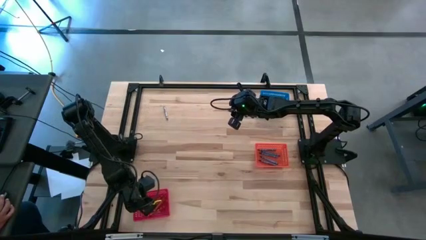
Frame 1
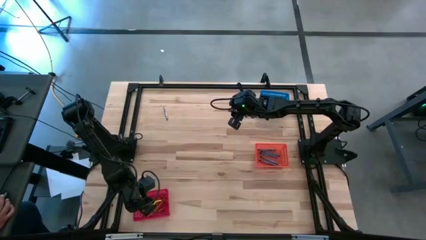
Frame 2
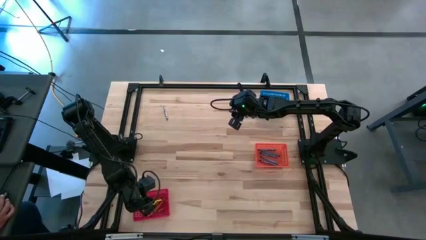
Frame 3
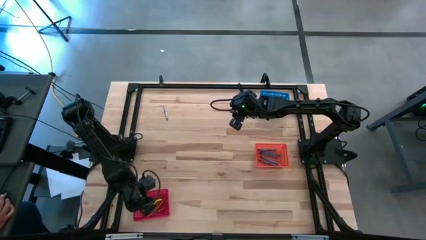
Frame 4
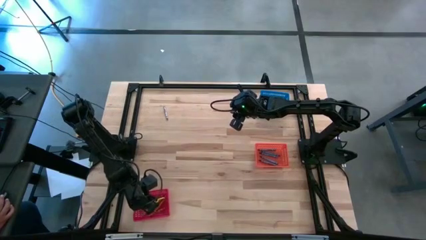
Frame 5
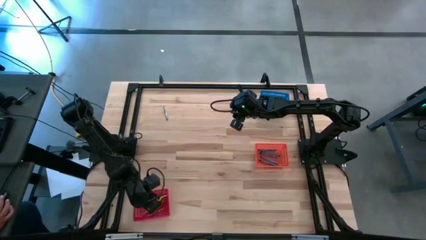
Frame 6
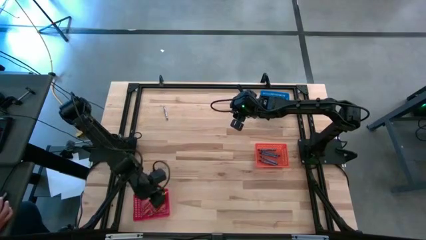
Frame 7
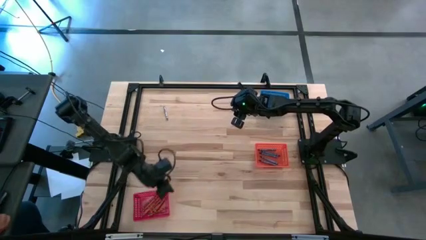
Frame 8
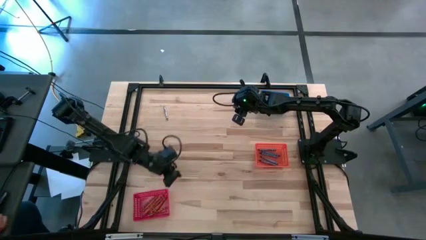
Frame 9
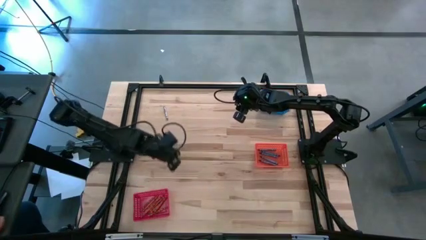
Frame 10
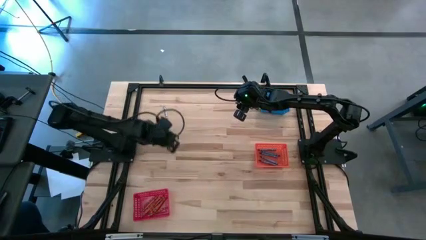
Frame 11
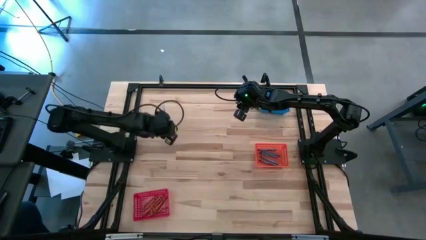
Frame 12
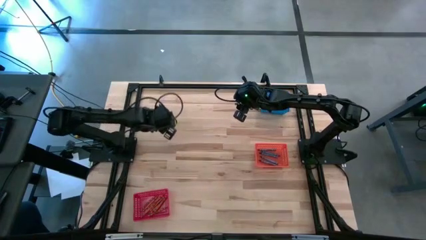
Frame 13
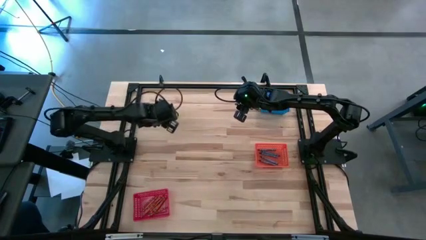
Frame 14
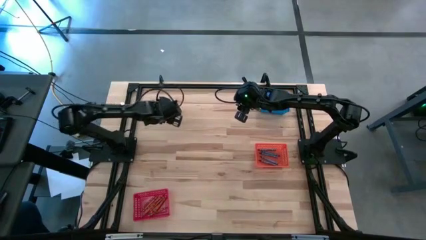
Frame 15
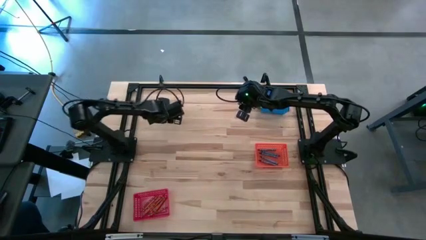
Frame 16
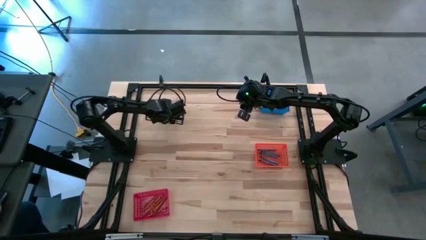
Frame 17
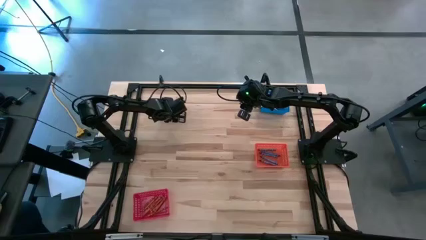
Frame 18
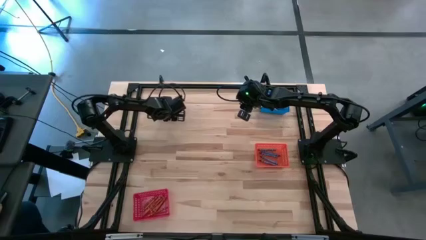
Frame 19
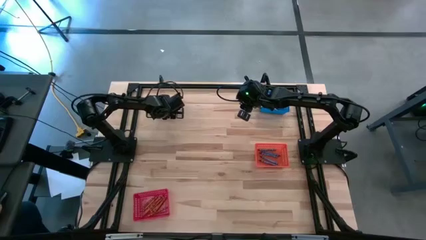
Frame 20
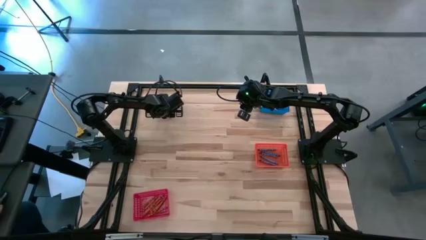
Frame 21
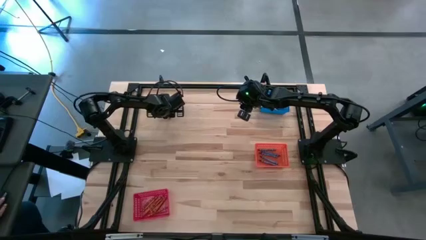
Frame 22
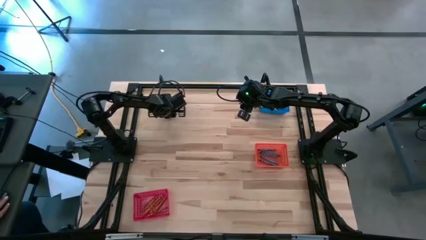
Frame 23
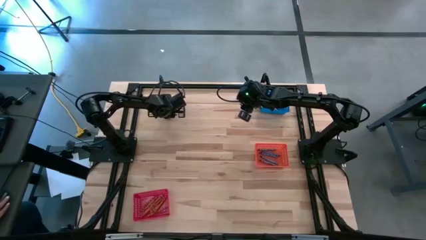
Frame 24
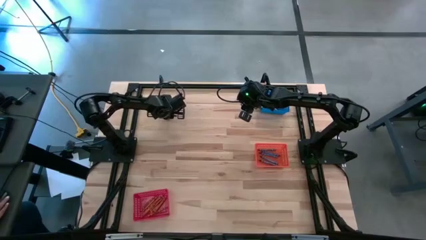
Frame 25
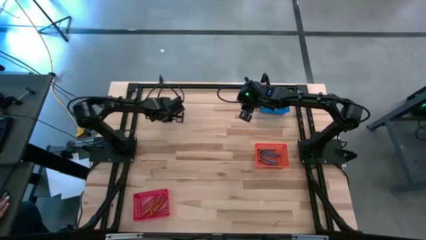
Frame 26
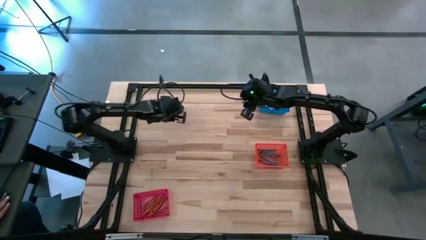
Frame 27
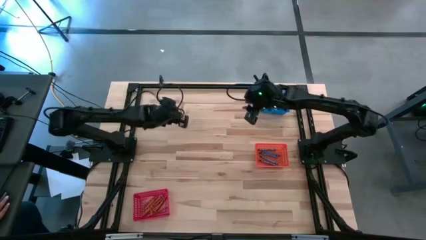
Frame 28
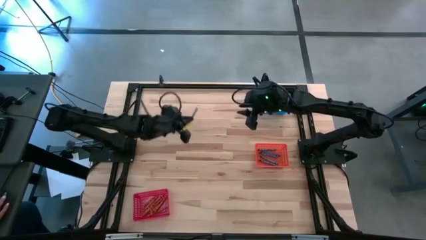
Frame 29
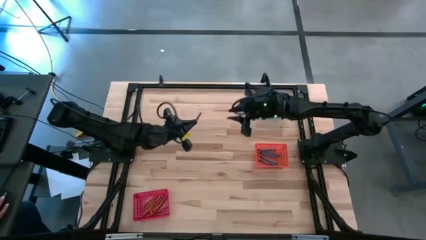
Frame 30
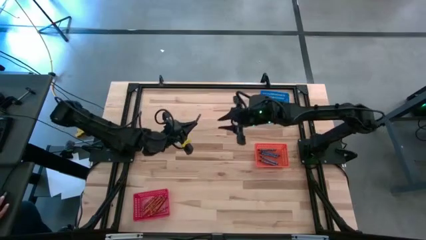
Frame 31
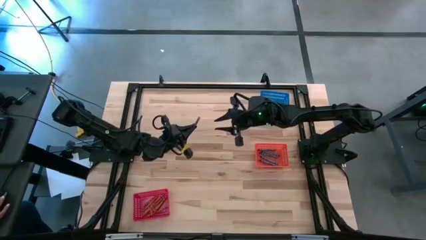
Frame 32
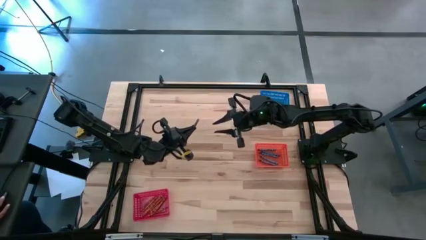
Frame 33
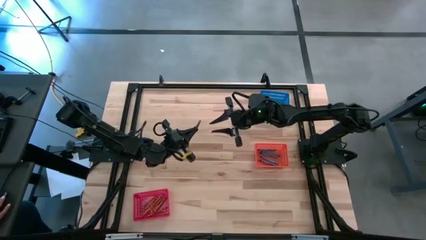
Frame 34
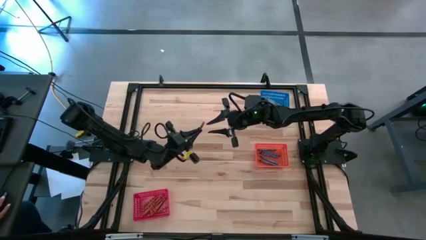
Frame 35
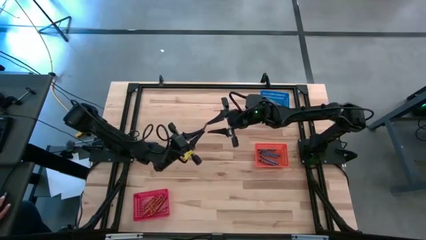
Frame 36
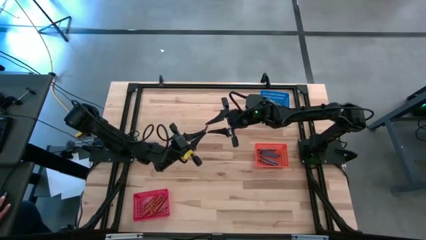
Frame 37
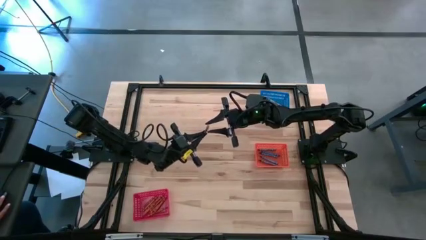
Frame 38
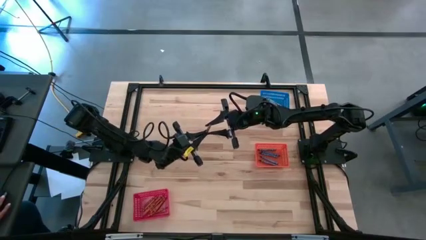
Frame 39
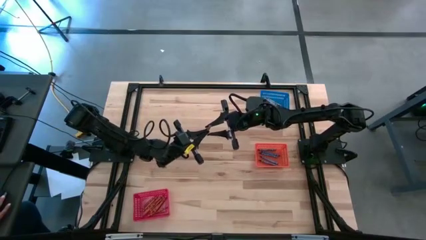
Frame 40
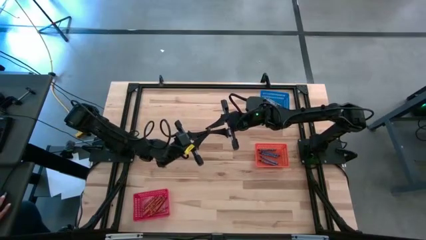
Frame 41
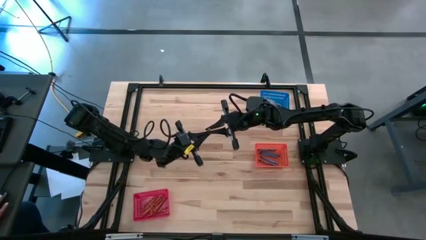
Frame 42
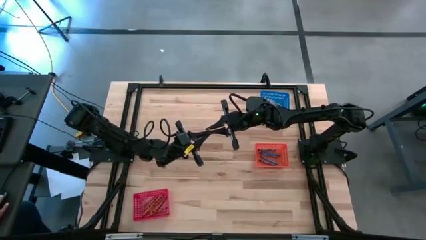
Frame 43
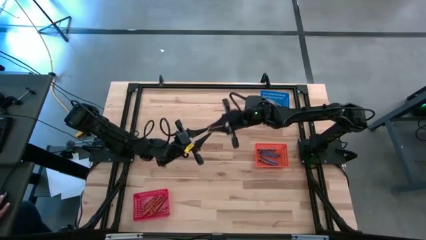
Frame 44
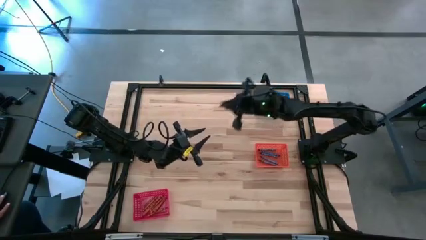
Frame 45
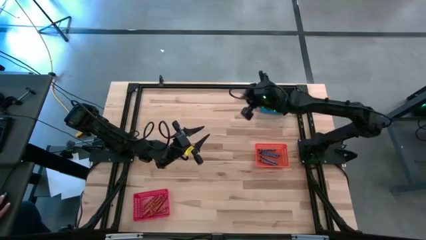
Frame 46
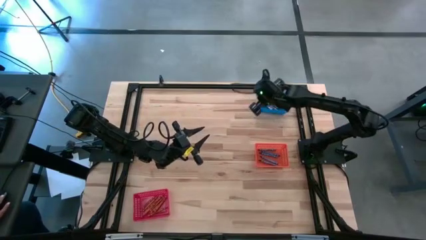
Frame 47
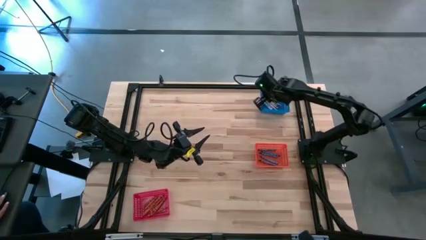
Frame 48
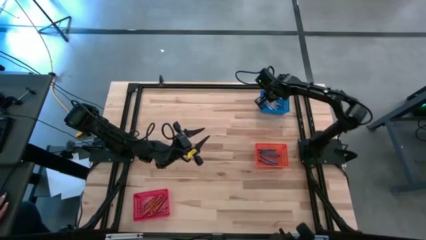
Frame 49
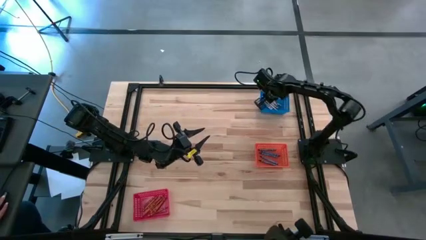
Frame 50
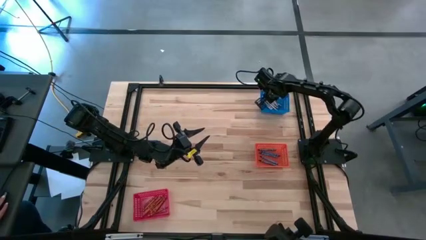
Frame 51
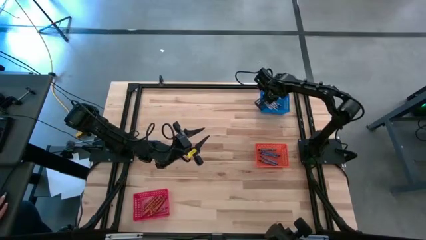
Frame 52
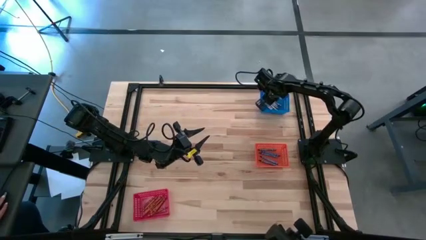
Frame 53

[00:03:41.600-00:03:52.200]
Task: Sort crayons
Put the gray crayon into the blue bin

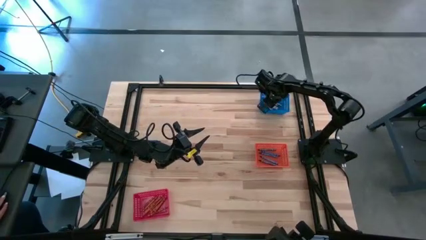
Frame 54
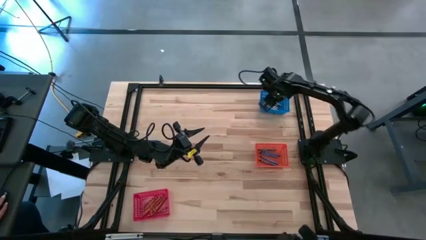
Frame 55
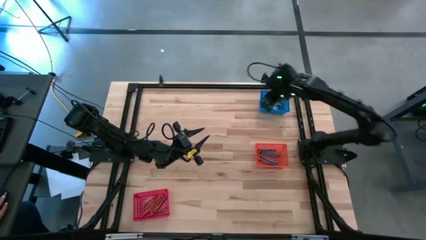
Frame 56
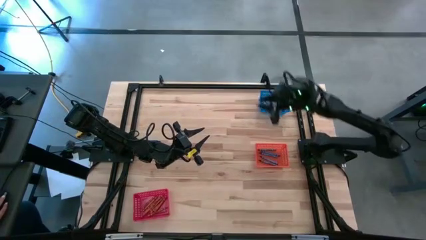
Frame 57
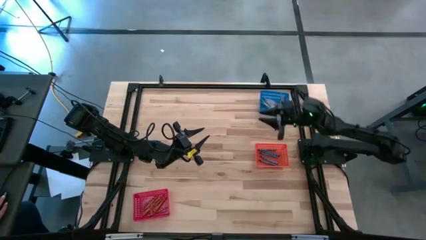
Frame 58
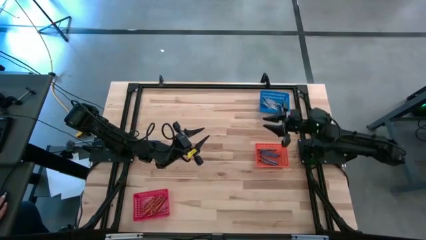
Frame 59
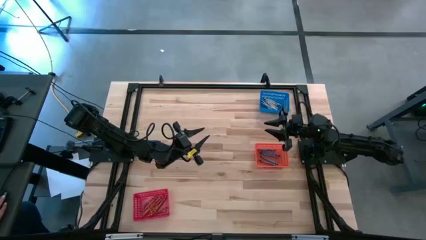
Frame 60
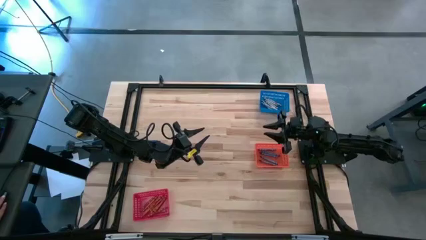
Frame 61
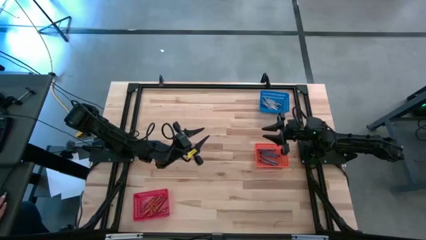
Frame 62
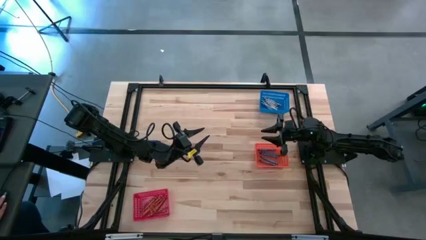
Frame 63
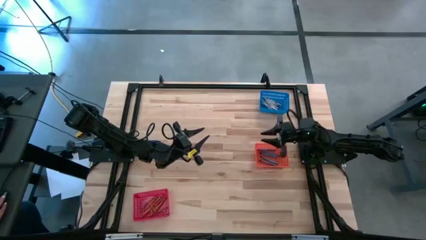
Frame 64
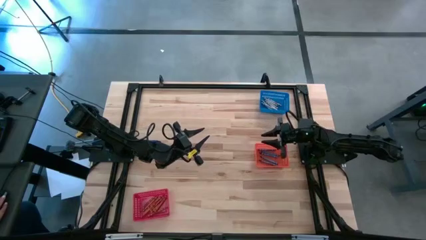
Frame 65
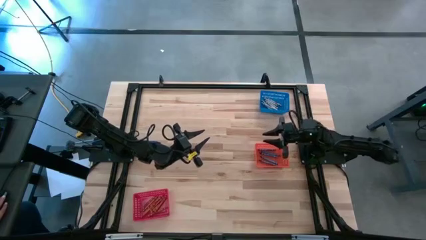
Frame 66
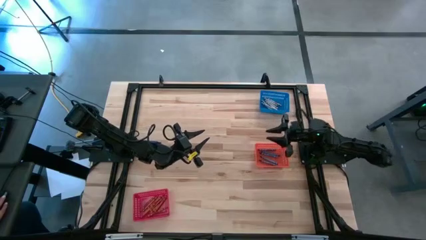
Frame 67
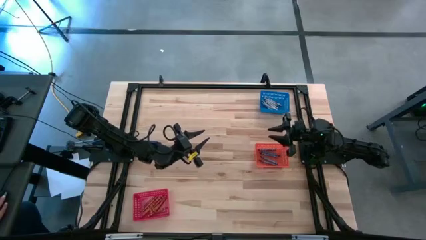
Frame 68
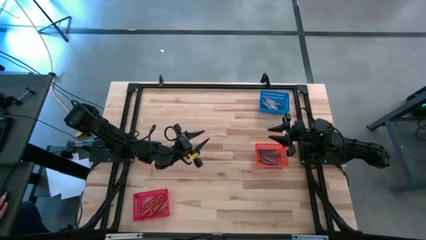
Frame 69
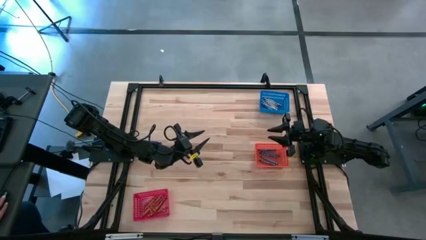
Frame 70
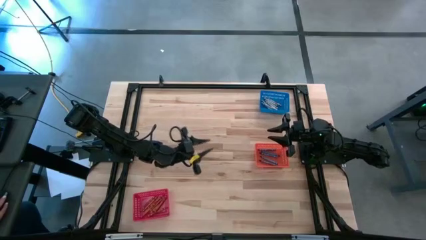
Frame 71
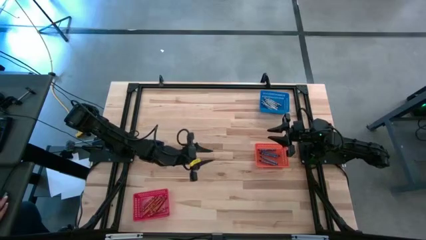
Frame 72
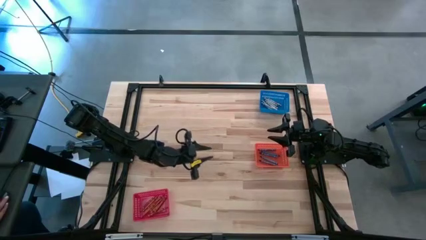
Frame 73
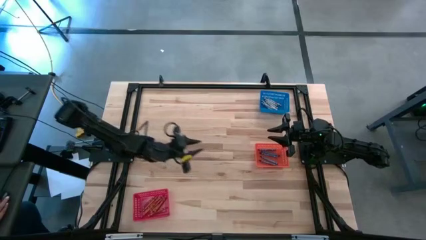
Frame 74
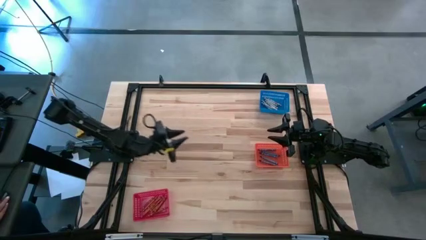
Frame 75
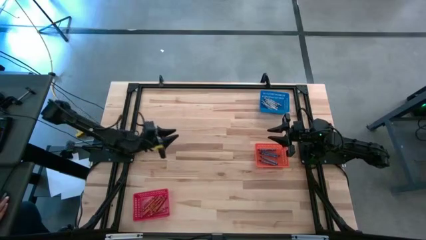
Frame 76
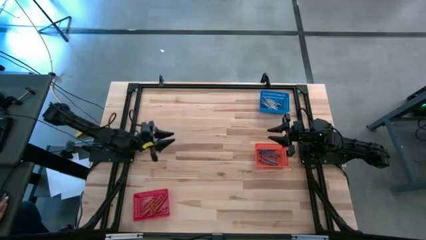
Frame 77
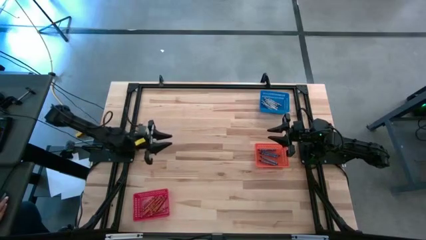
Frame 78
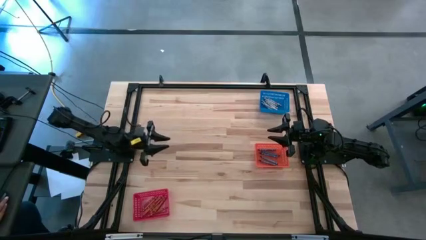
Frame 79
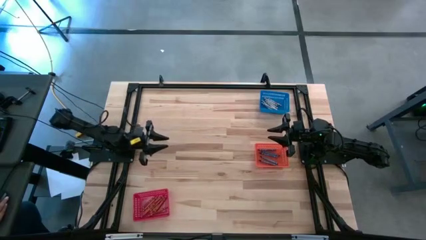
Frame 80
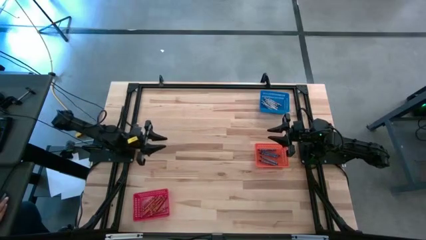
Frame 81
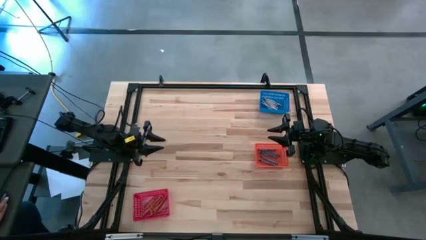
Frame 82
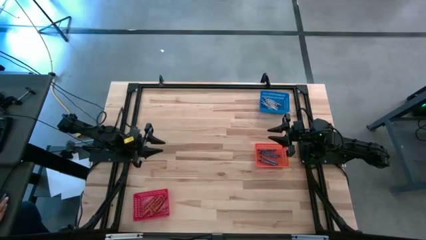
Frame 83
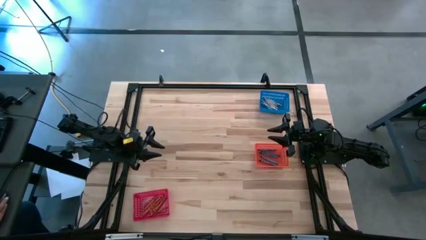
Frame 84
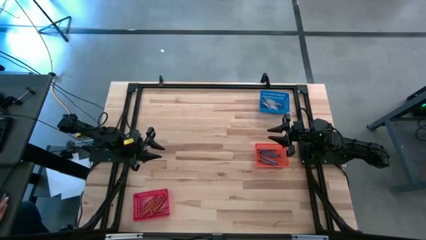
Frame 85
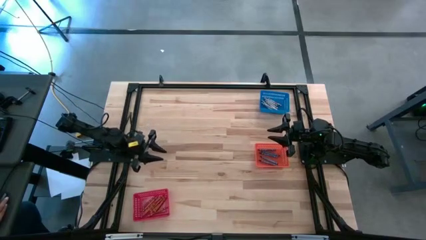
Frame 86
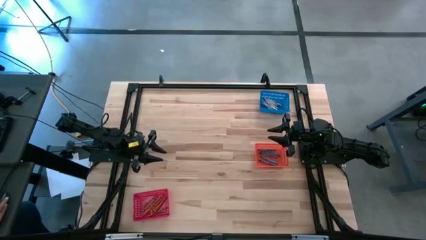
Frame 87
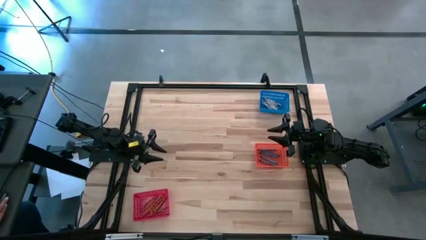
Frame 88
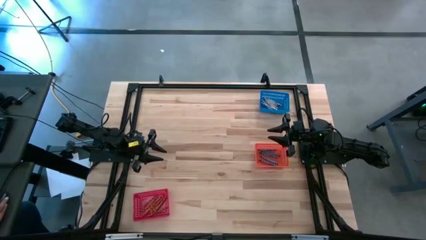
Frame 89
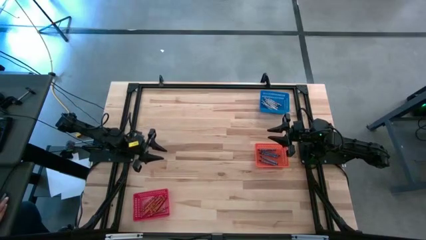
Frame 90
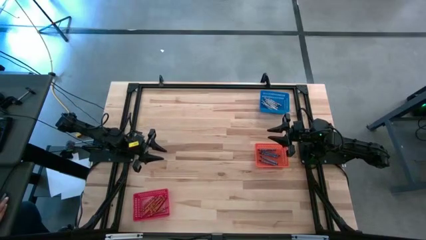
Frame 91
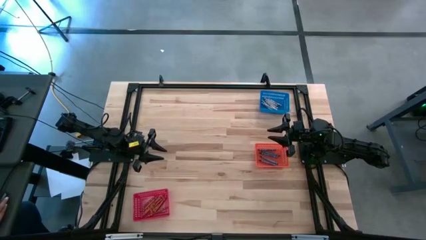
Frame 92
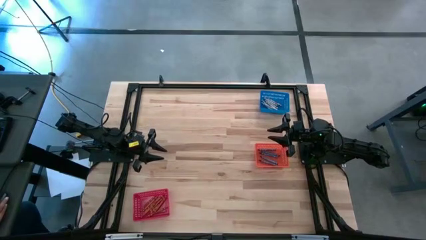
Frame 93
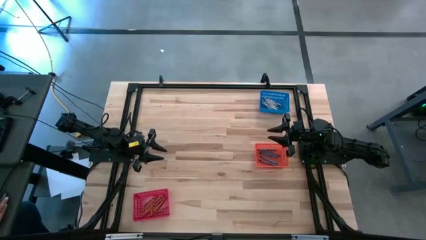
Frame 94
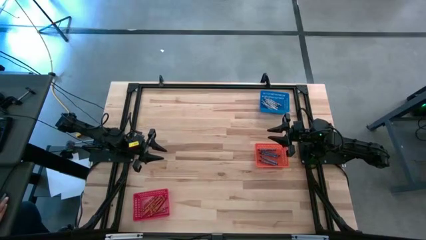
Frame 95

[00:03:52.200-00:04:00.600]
Return to Home Position
